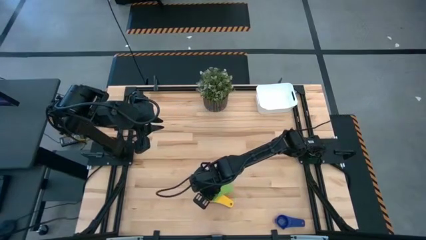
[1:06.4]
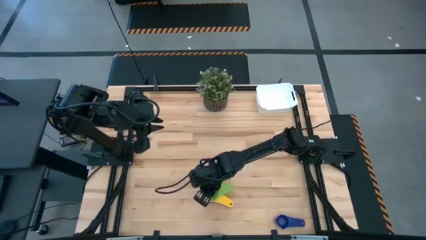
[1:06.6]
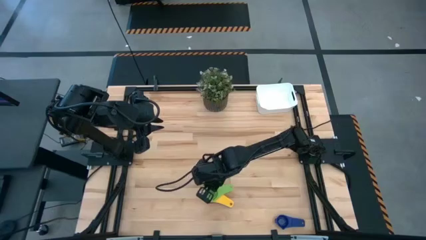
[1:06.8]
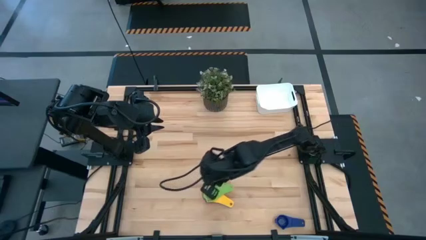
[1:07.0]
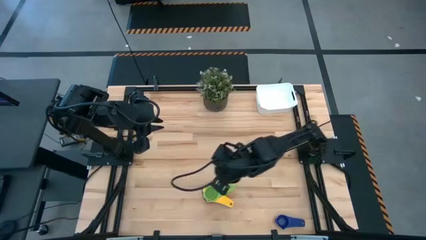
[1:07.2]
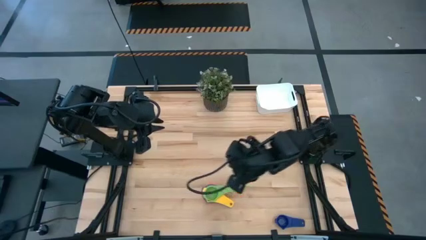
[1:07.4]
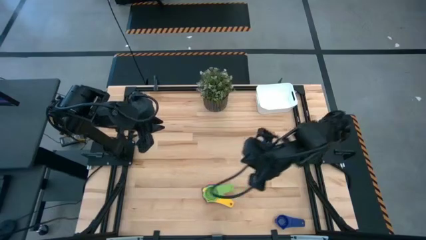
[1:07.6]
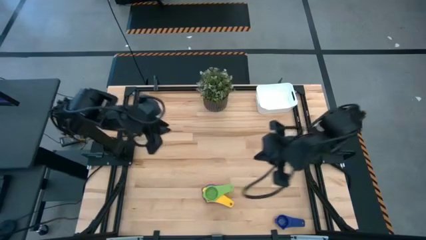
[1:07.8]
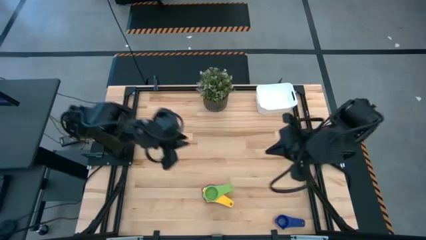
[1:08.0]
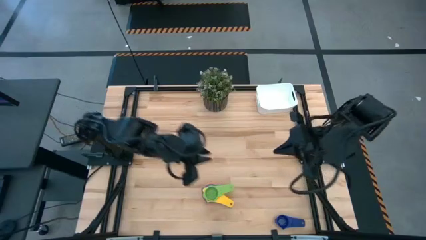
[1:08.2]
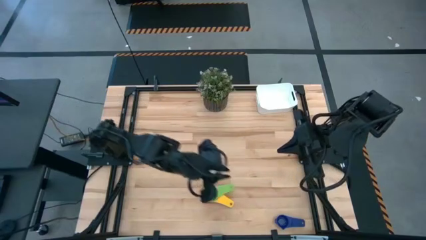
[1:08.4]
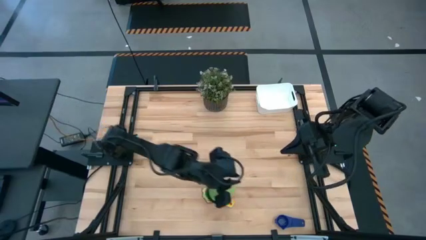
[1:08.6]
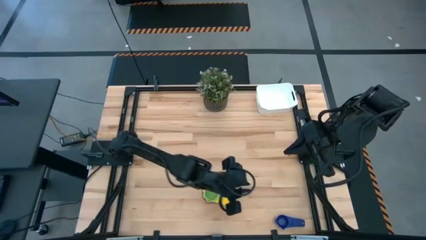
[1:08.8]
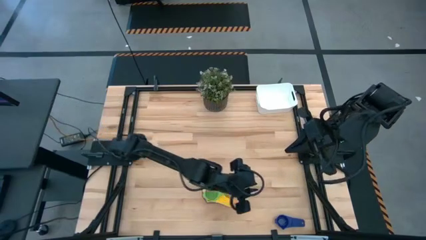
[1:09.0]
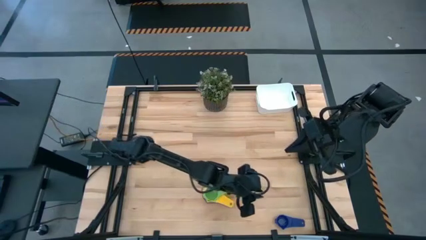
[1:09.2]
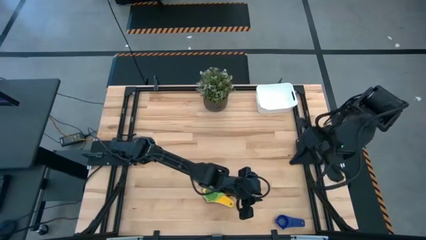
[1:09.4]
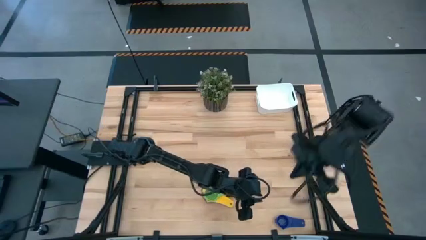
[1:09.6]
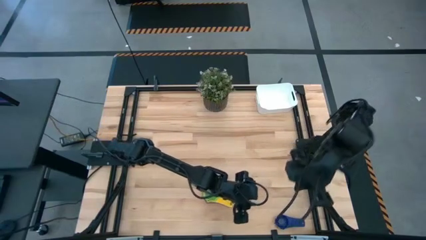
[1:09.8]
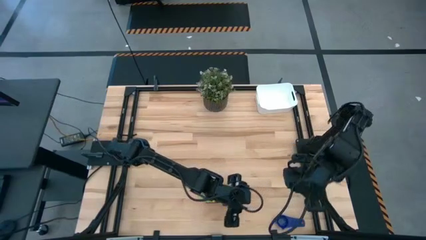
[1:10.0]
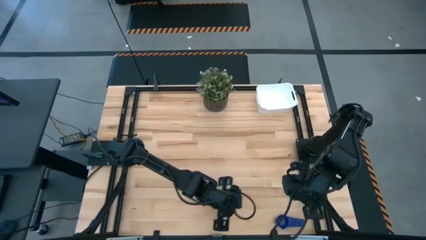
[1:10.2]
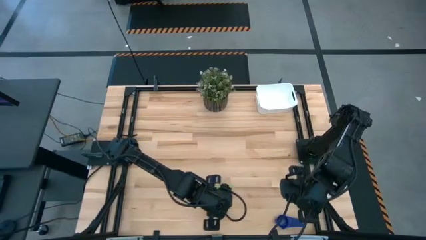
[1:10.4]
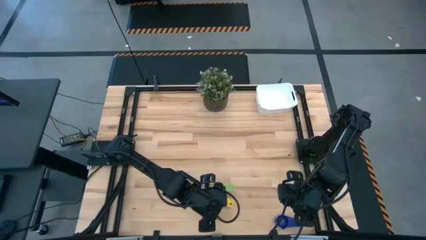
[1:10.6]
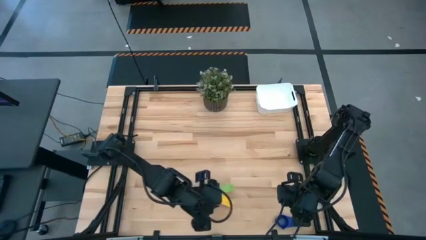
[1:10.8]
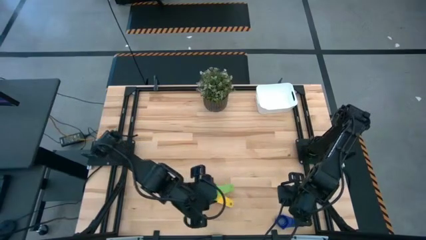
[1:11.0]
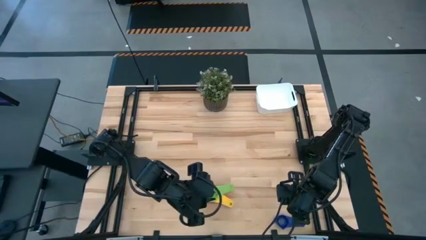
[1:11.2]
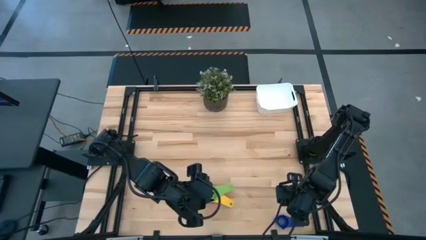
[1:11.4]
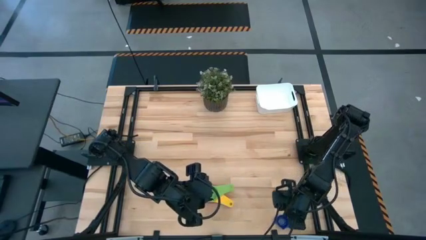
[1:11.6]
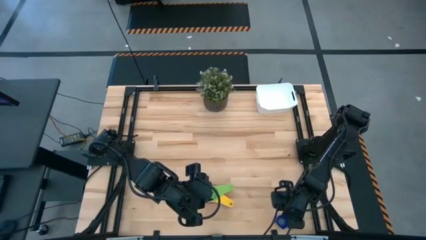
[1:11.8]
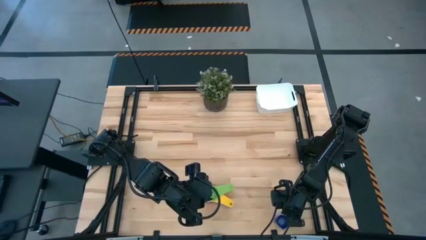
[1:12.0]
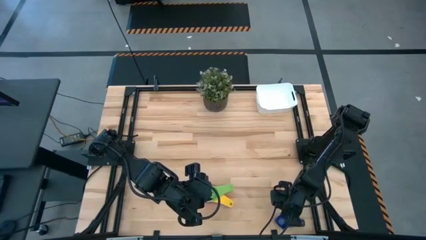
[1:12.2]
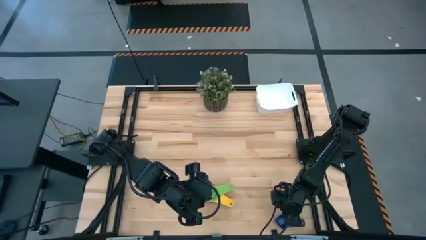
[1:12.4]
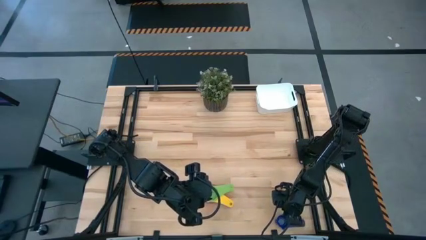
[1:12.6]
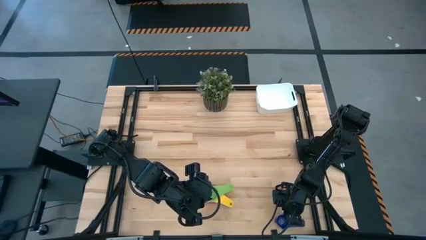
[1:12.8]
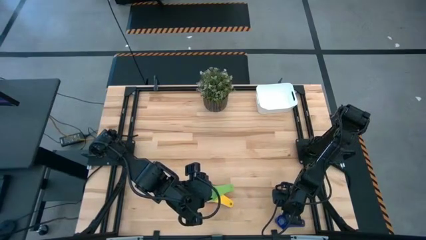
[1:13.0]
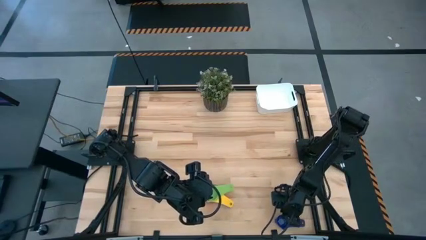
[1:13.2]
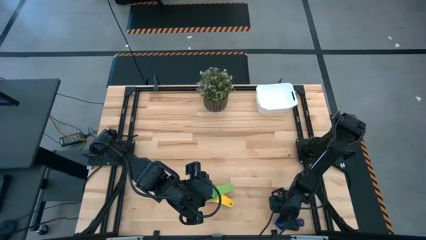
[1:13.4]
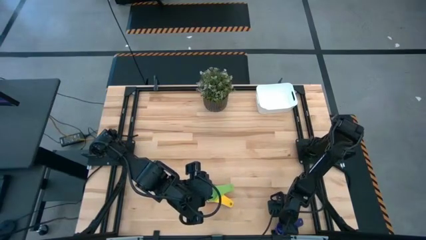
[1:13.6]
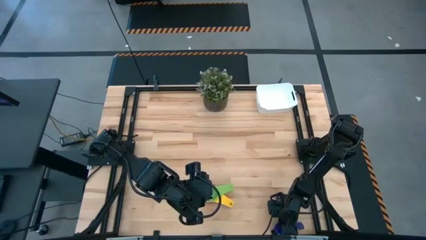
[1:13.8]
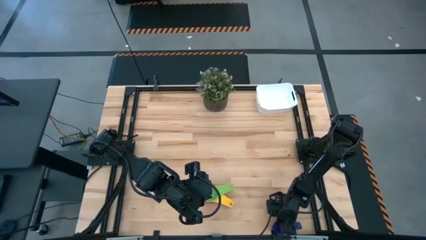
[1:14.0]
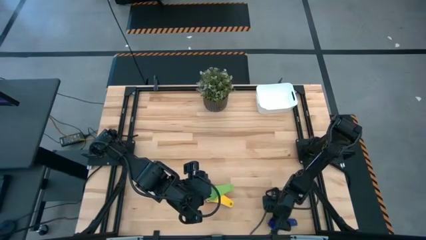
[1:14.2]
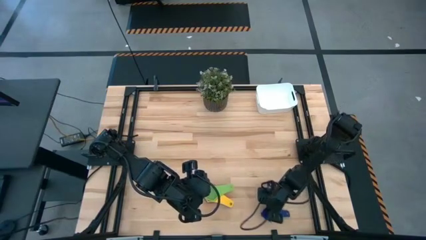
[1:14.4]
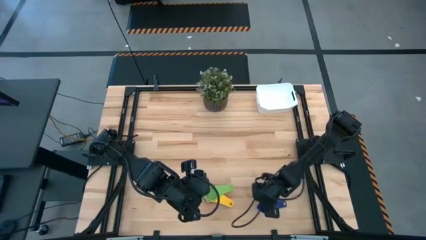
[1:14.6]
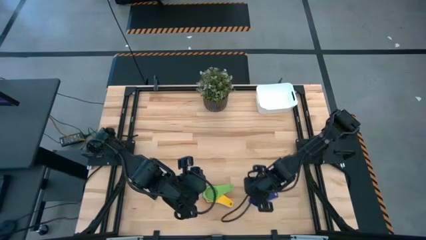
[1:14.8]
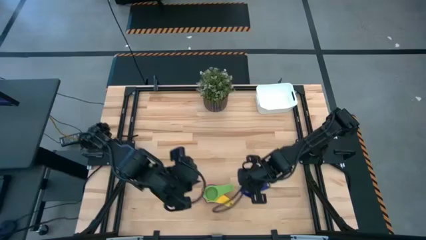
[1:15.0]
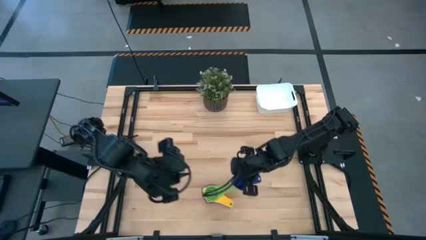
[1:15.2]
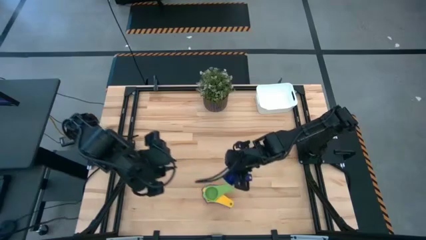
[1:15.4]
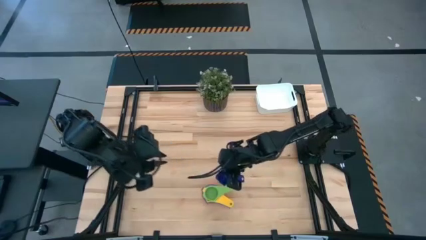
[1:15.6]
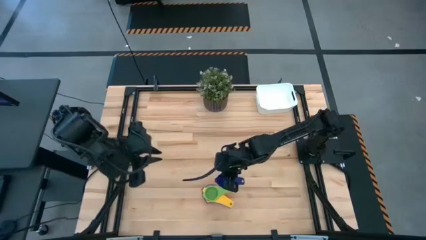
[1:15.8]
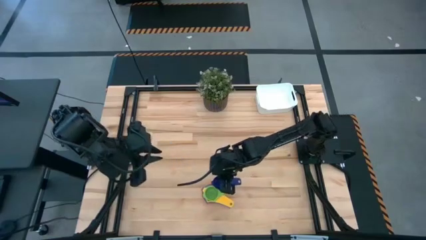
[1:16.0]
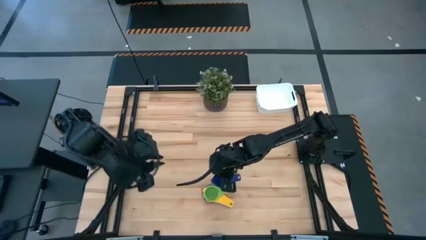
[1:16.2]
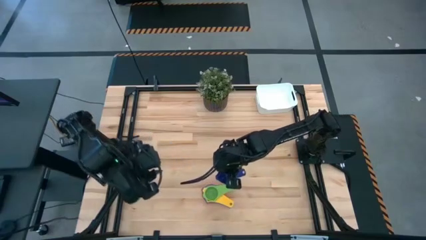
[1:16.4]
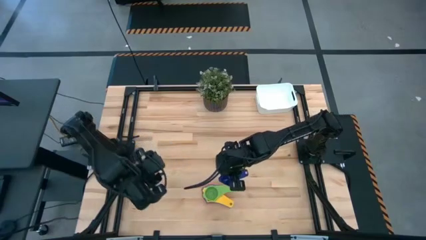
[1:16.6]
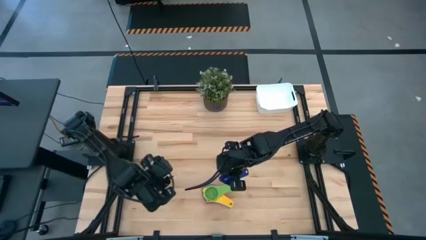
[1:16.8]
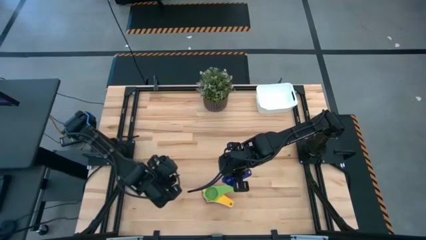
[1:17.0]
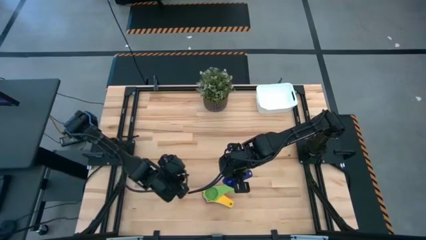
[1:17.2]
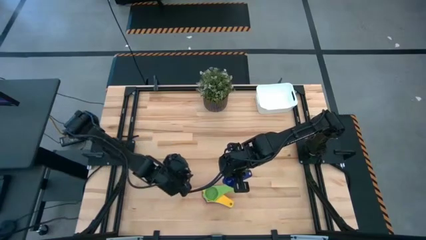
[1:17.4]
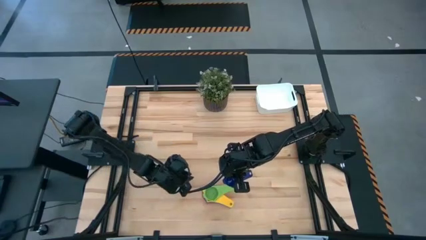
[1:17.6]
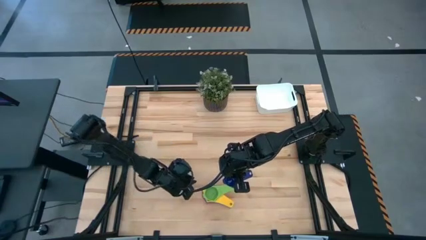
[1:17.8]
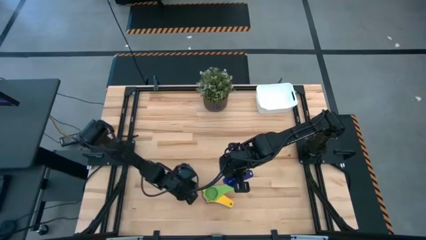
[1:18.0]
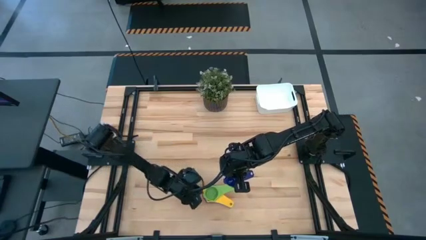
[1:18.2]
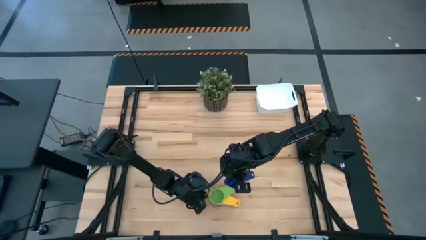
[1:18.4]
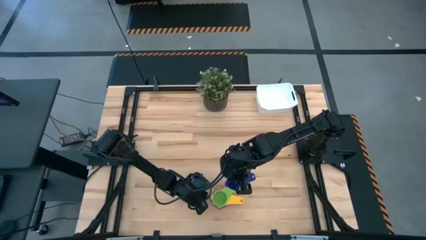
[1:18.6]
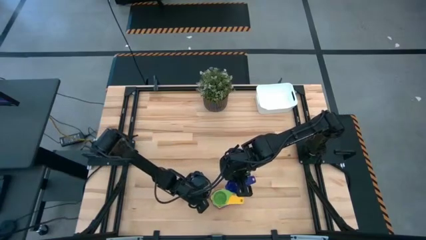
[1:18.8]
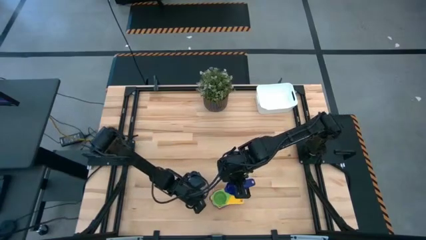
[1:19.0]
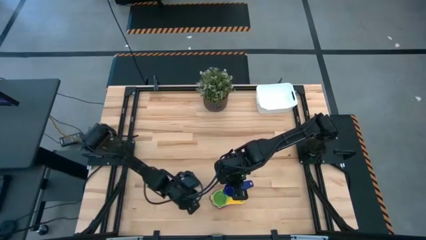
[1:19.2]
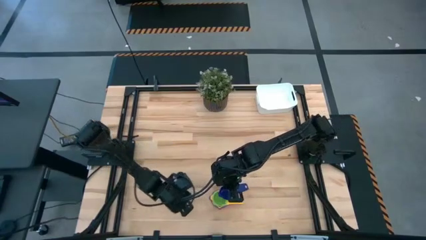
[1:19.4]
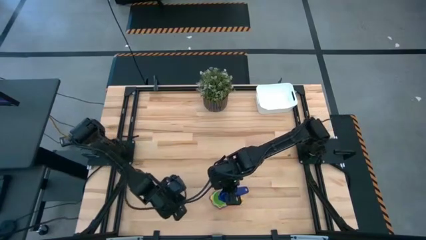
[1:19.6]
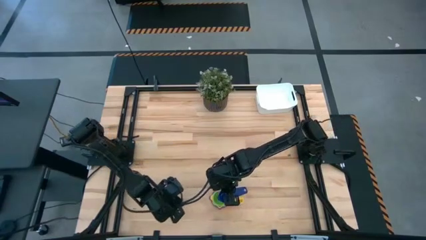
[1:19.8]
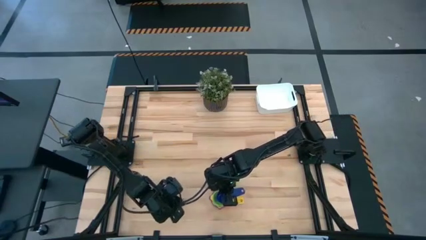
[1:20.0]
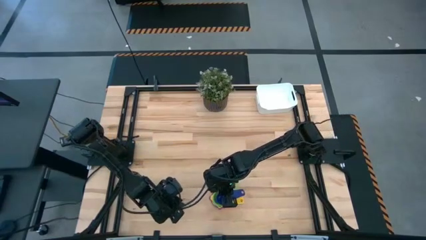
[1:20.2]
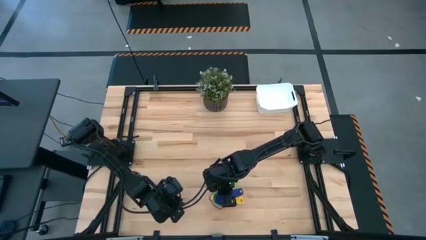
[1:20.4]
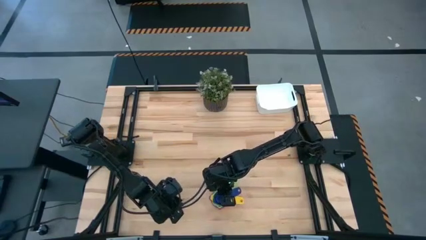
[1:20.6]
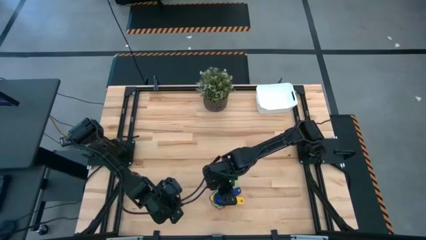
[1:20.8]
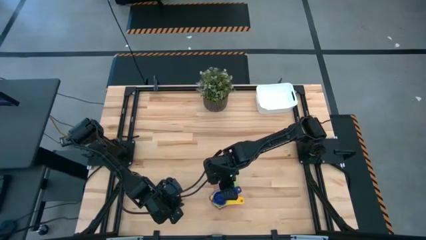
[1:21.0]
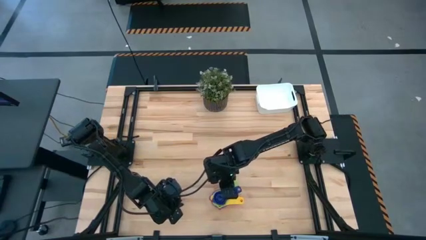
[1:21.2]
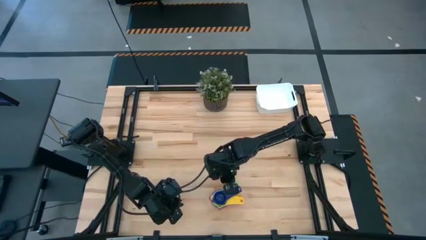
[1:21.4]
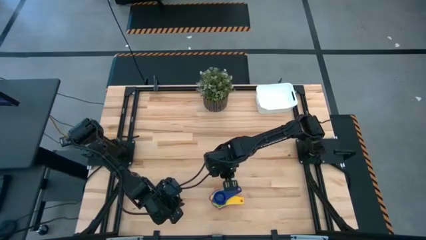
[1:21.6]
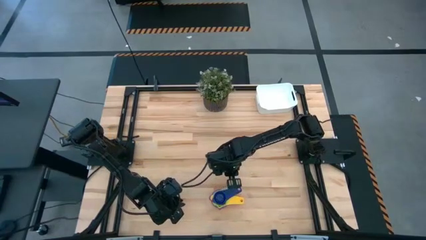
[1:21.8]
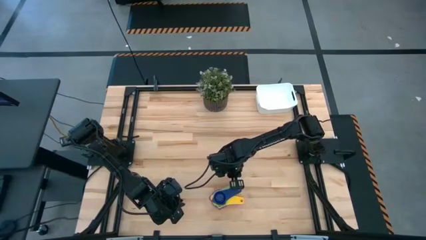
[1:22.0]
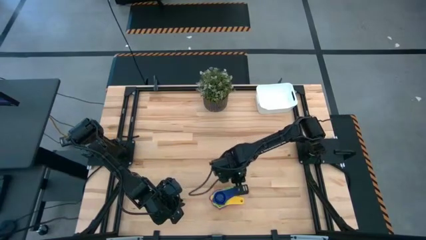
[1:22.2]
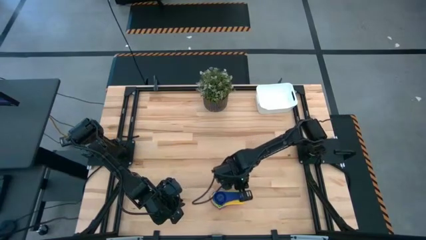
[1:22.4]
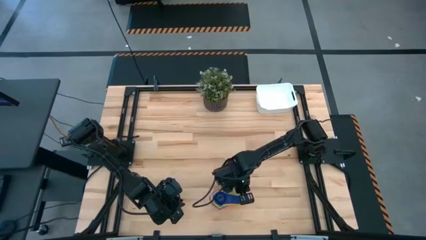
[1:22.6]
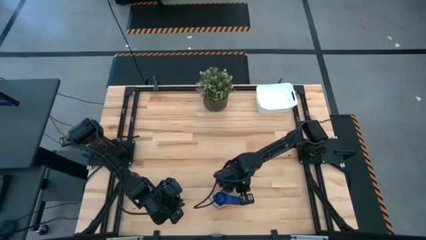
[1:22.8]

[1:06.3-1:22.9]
Task: Nest measuring cups in basket
Stack the dark blue measuring cup on top of the green measuring cup
